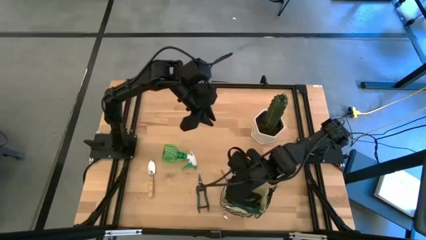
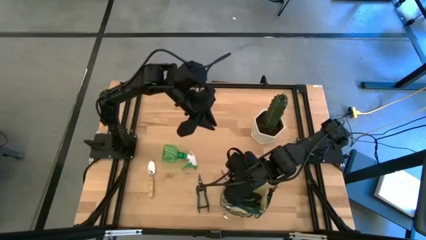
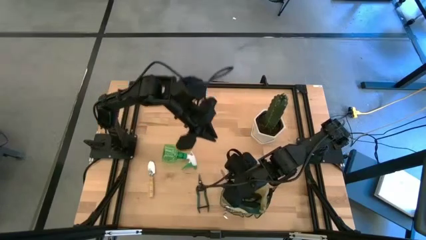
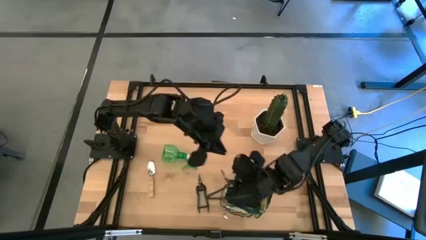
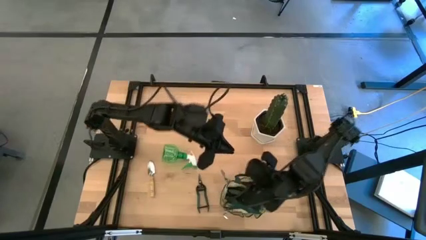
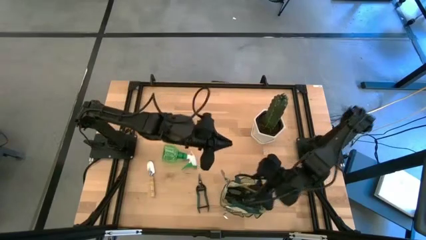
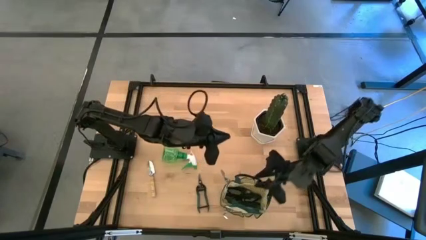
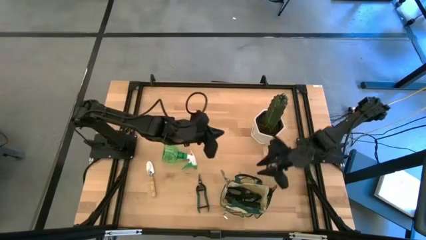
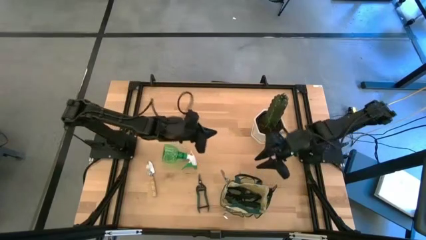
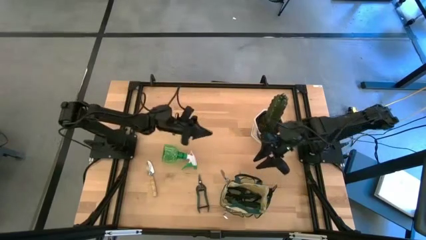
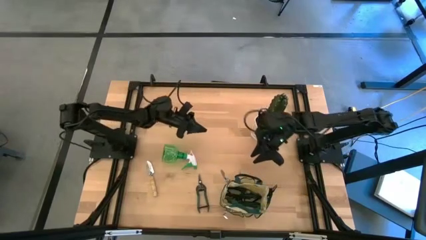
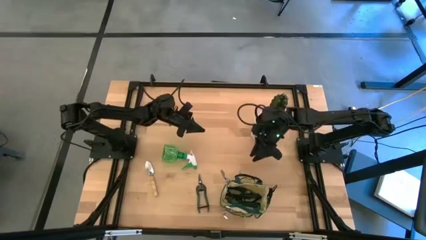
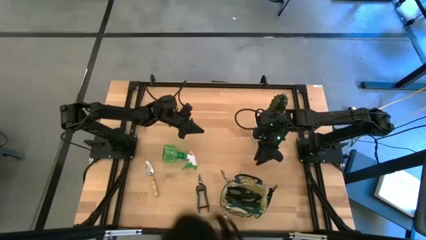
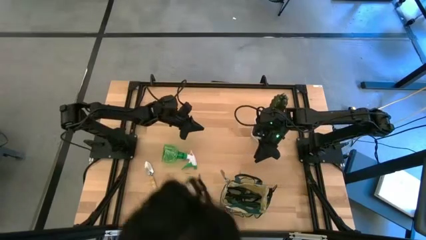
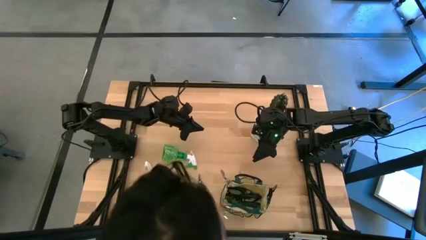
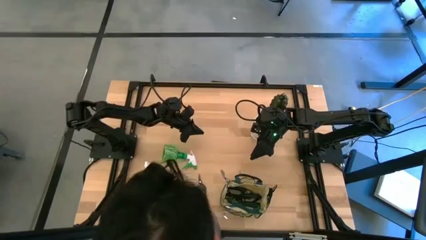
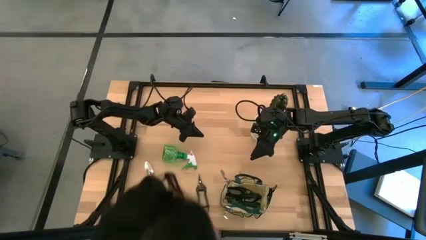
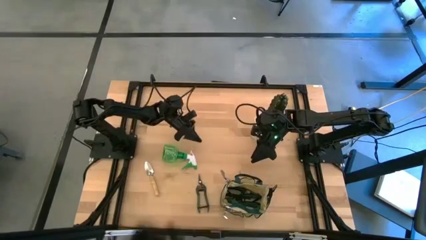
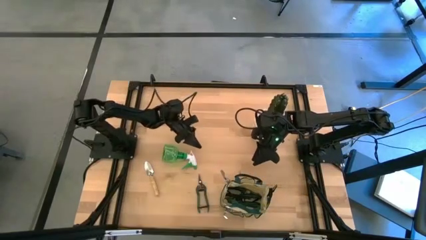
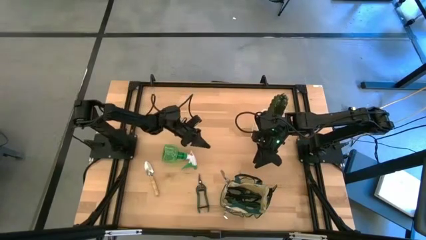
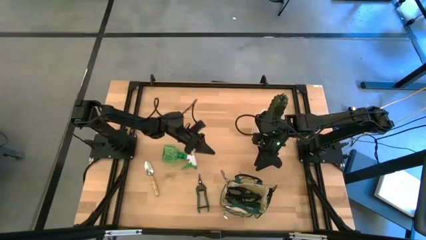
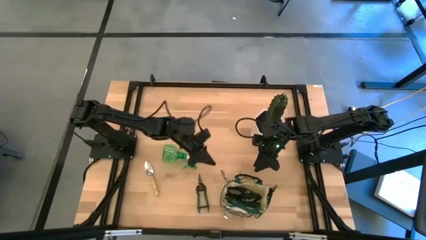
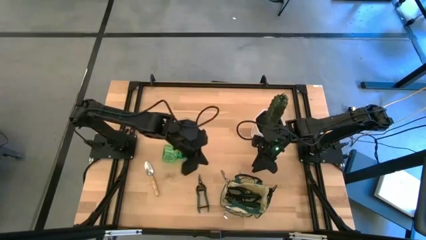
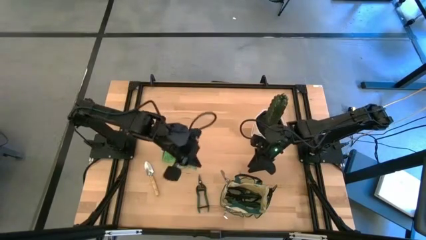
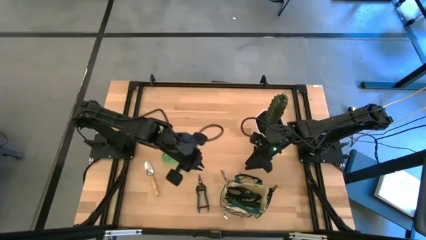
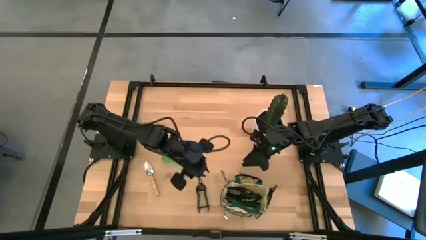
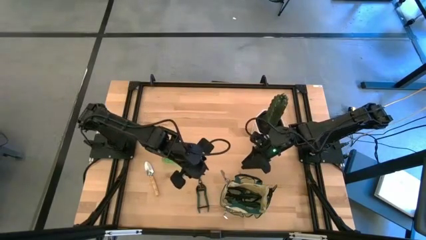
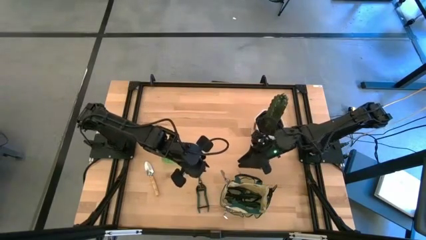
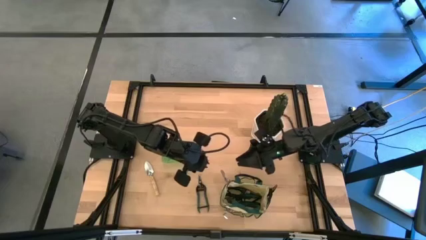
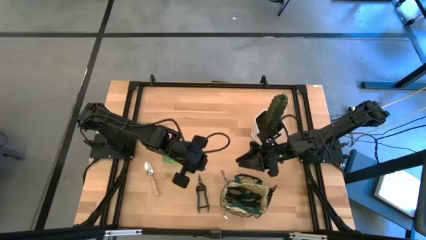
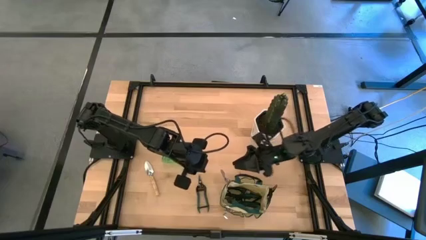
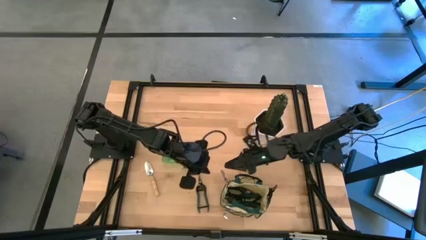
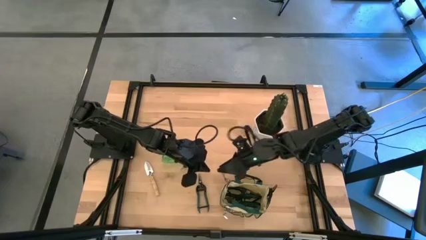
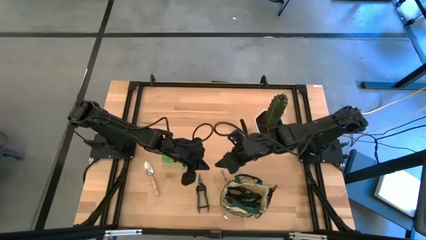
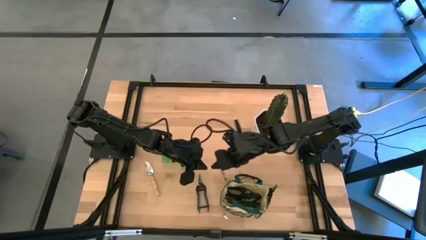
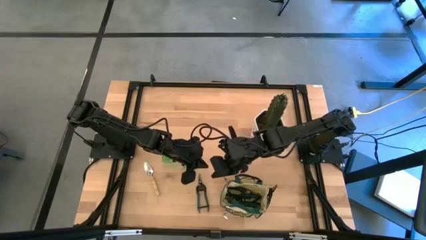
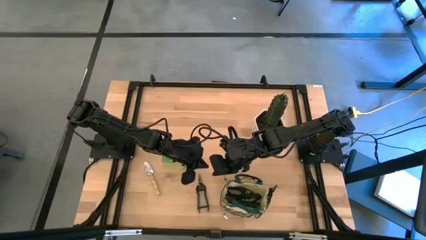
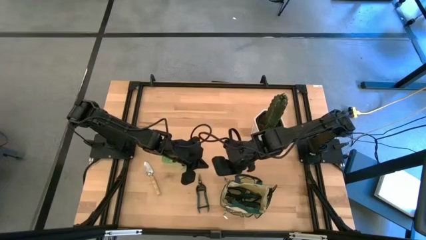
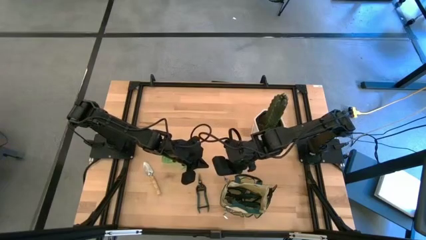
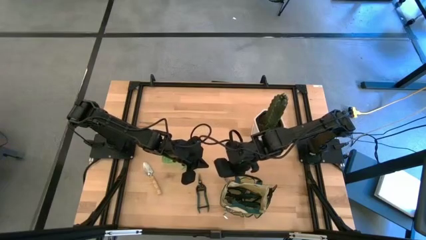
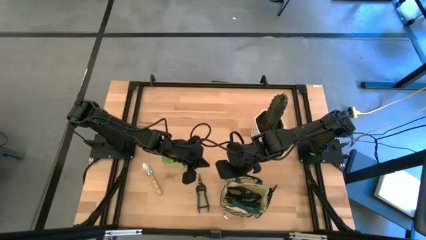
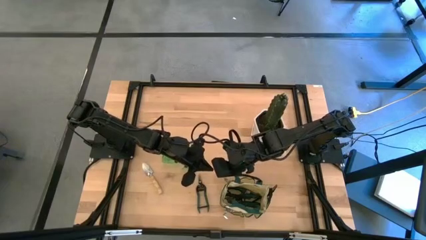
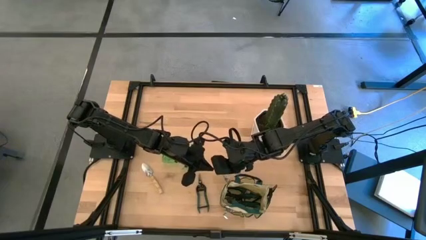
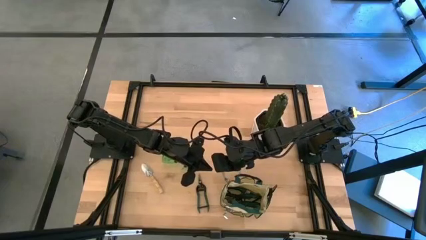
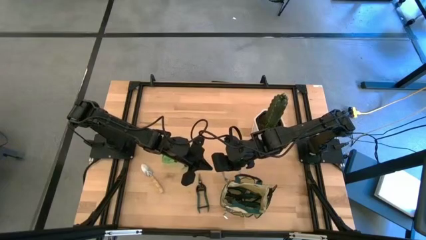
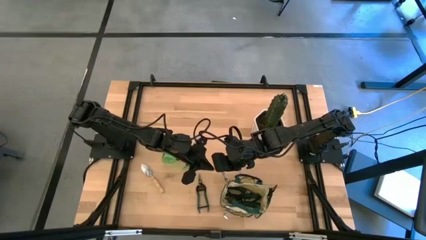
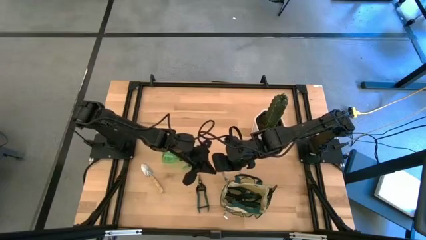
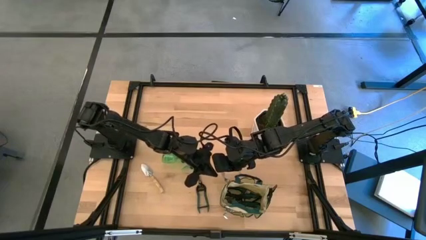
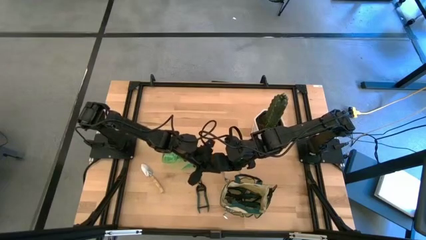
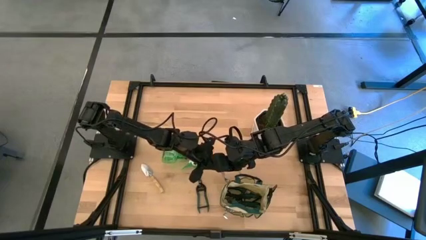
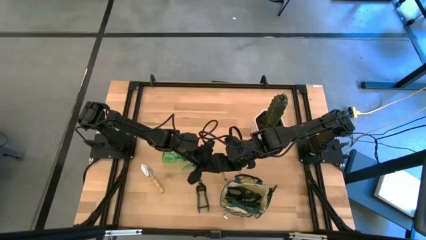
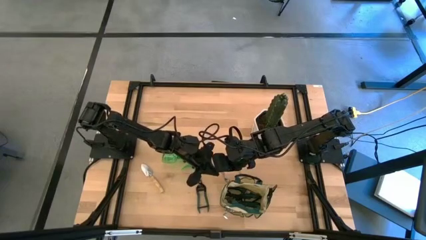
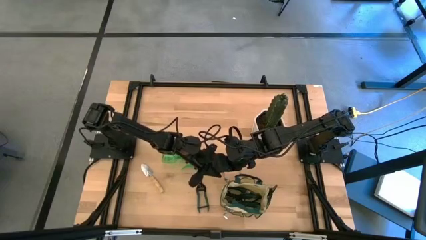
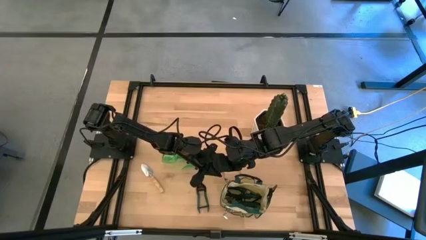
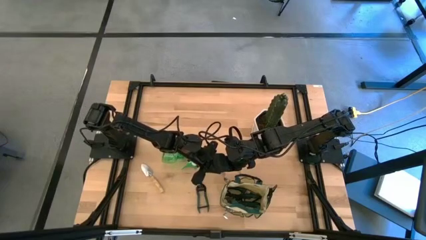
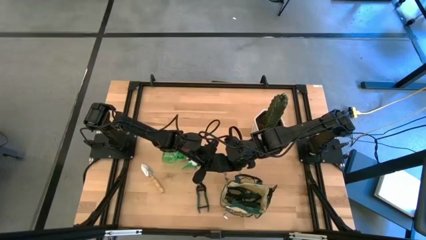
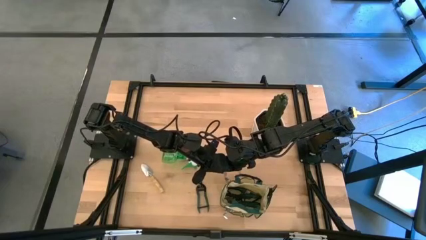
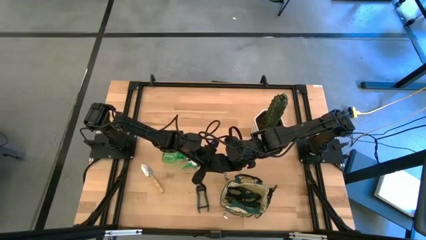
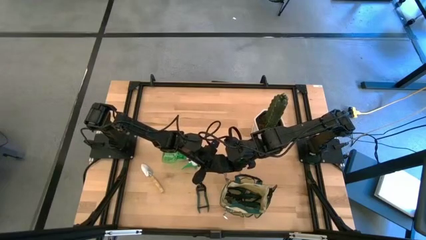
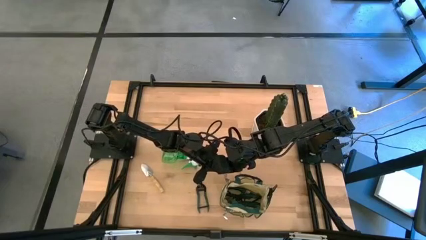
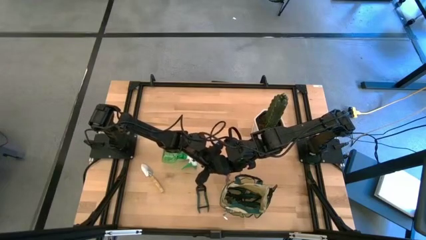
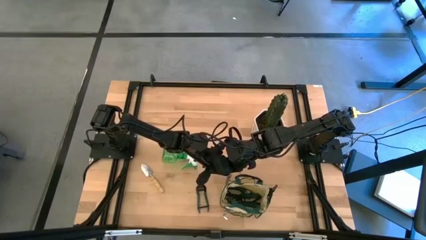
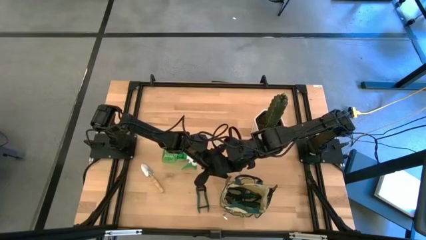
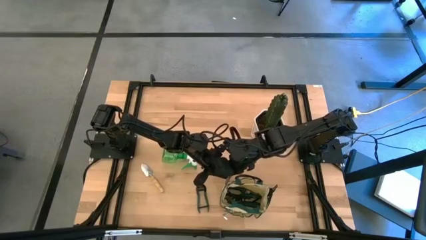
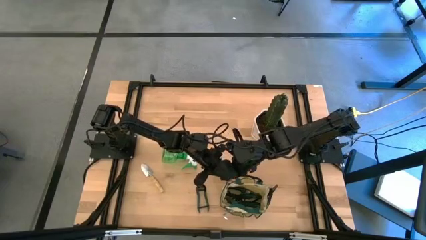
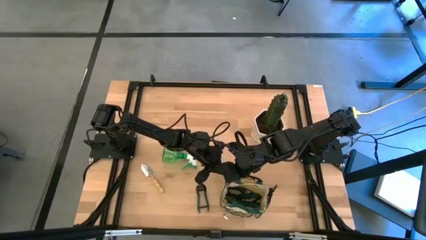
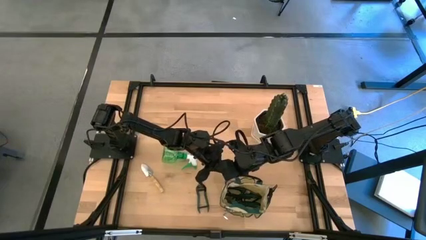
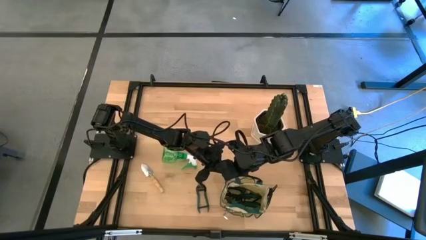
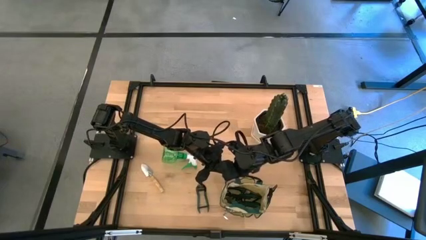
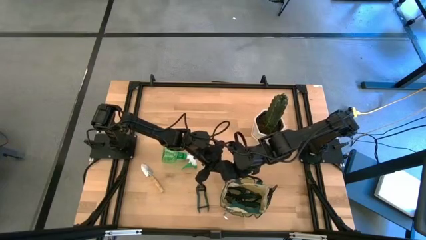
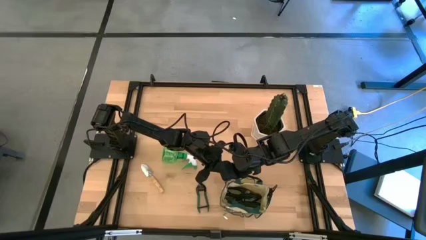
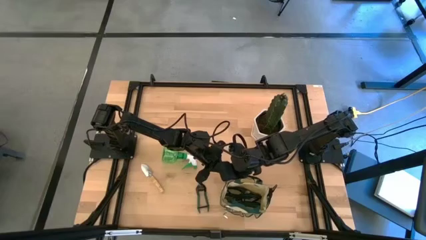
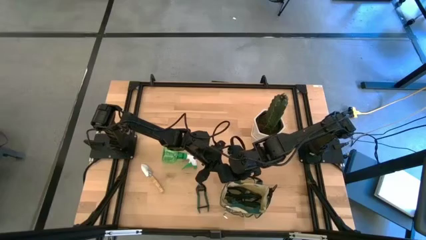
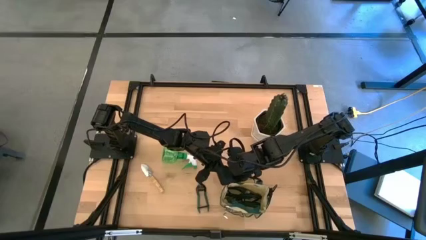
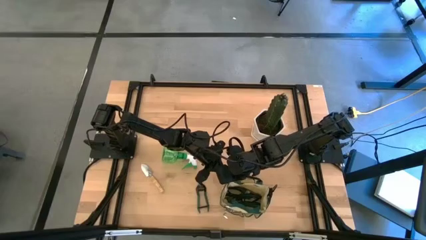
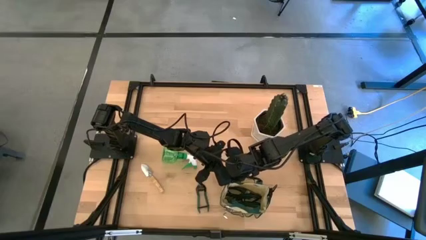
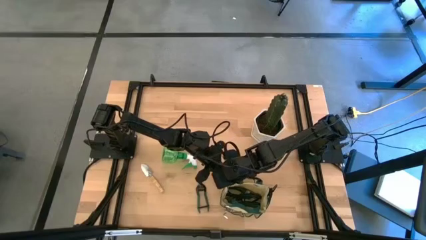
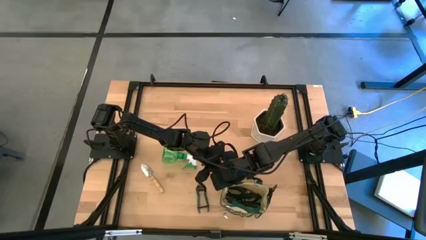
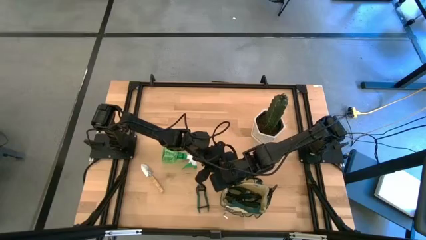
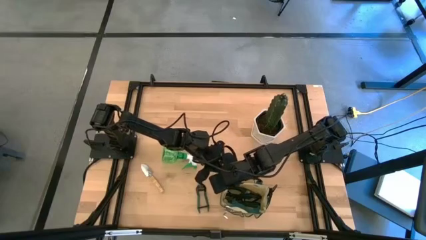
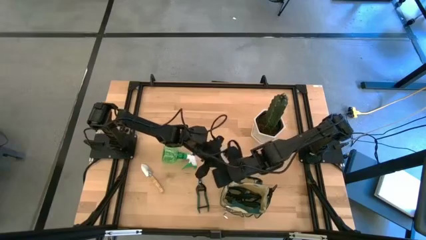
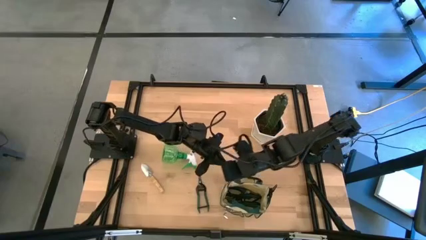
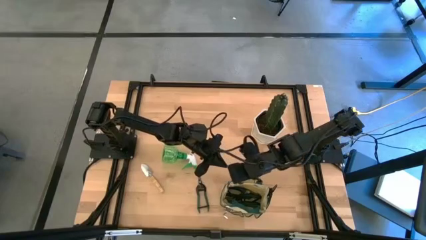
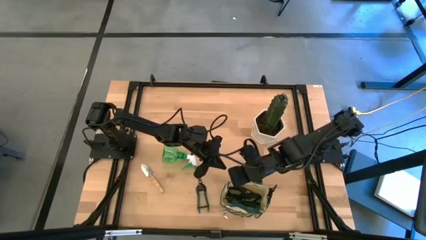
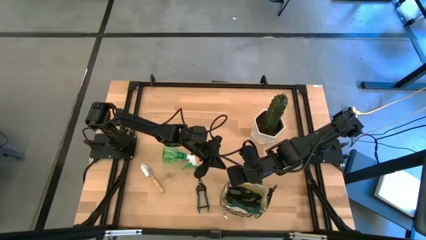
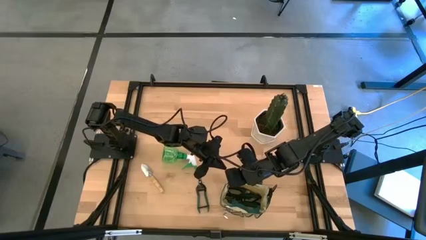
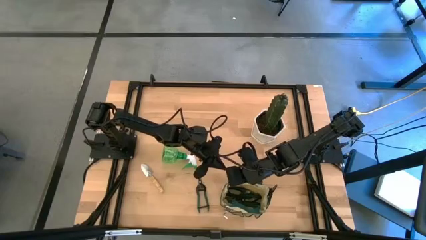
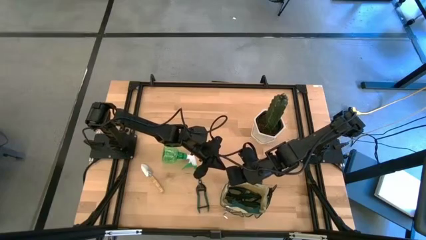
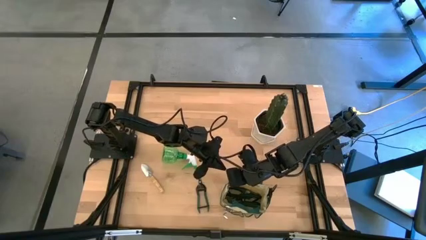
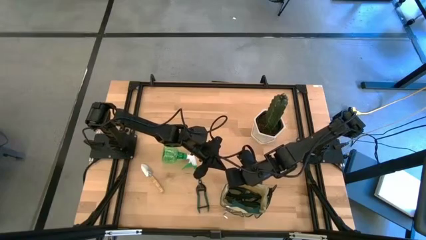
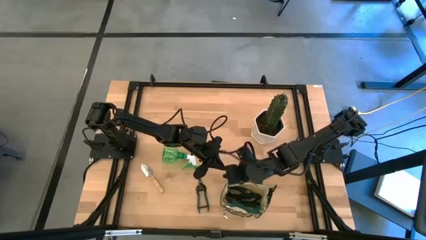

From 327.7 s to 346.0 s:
Task: Pick & Place Garden tools in Gardening bag
Put the right hand trowel into the side pocket of the white bag
